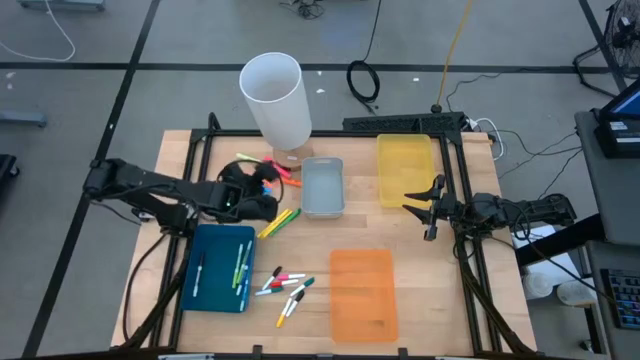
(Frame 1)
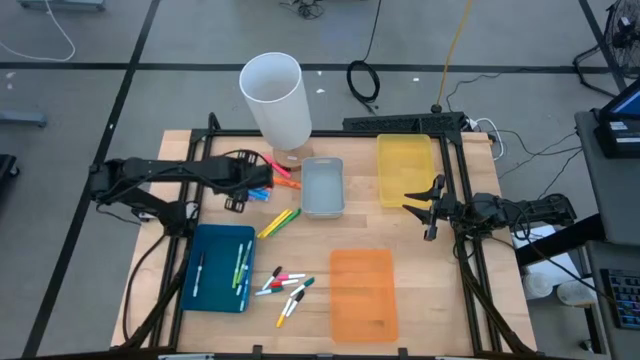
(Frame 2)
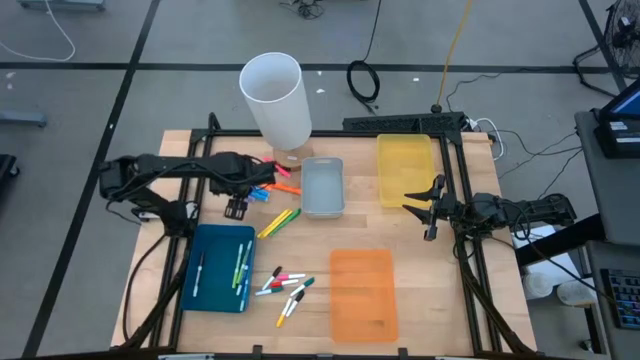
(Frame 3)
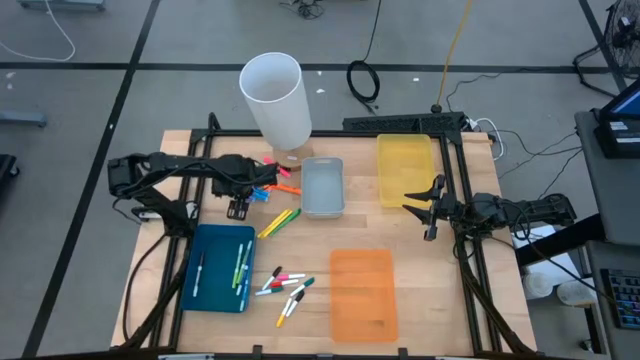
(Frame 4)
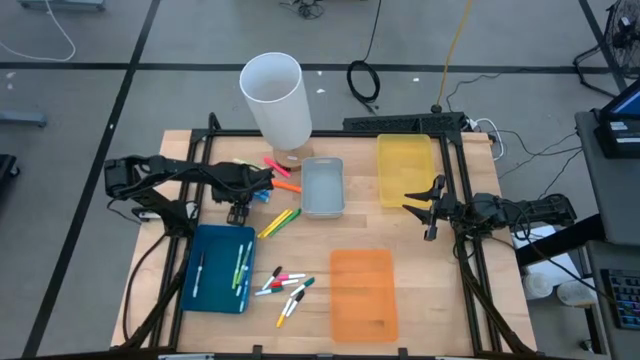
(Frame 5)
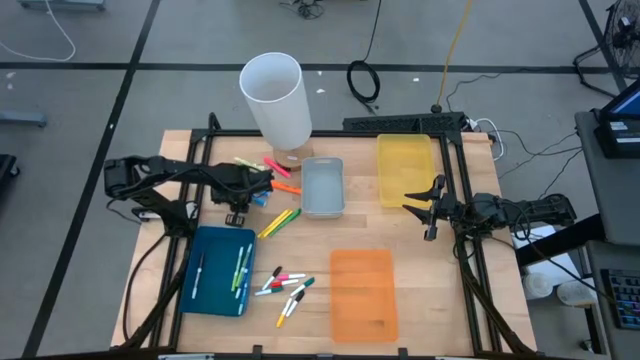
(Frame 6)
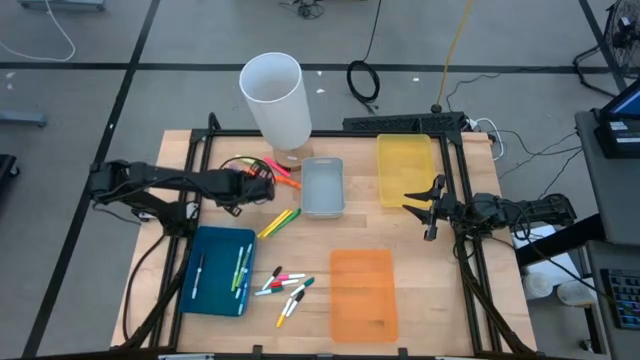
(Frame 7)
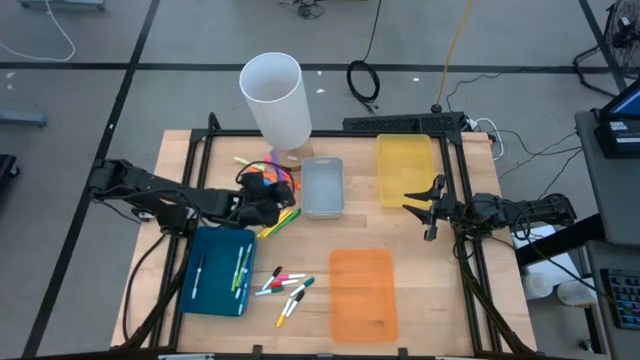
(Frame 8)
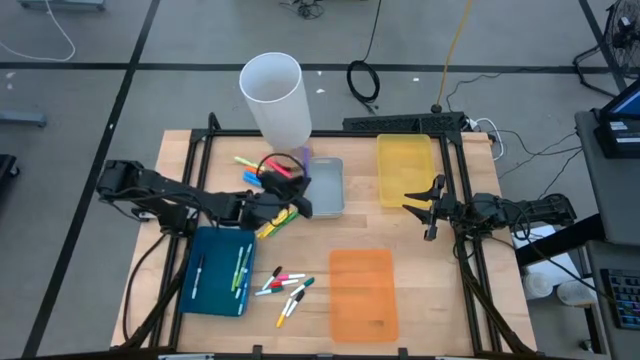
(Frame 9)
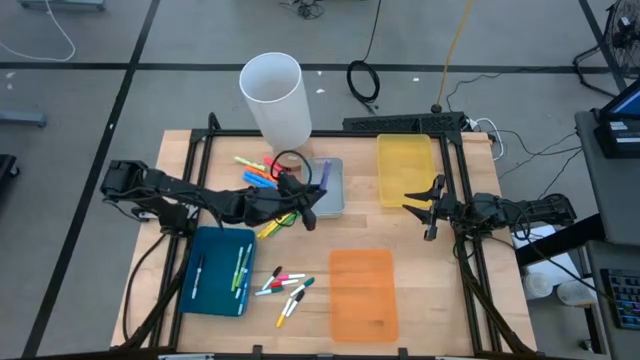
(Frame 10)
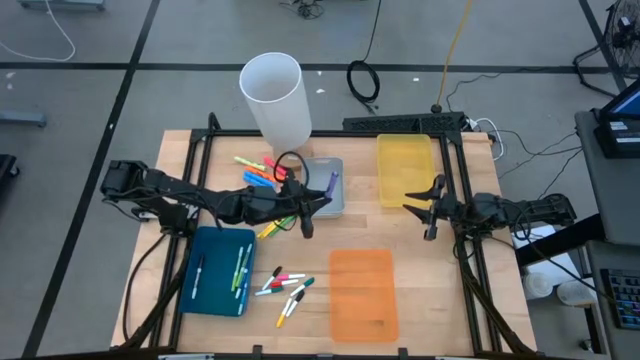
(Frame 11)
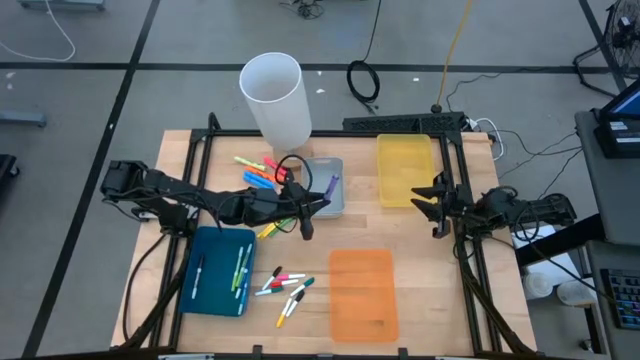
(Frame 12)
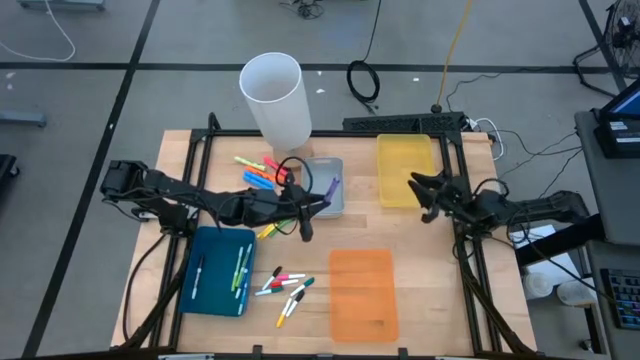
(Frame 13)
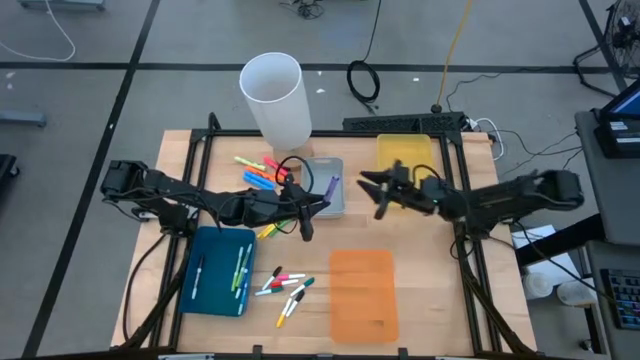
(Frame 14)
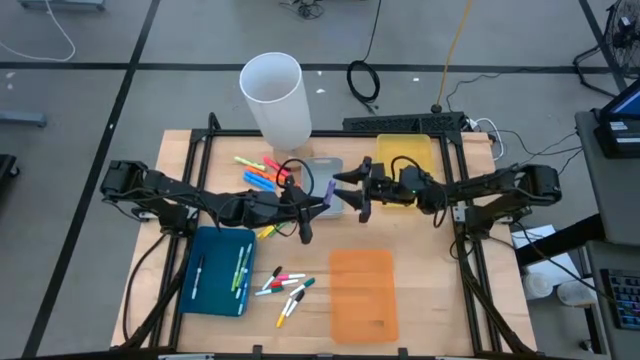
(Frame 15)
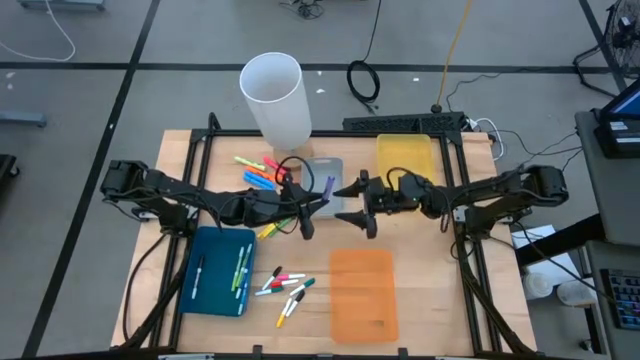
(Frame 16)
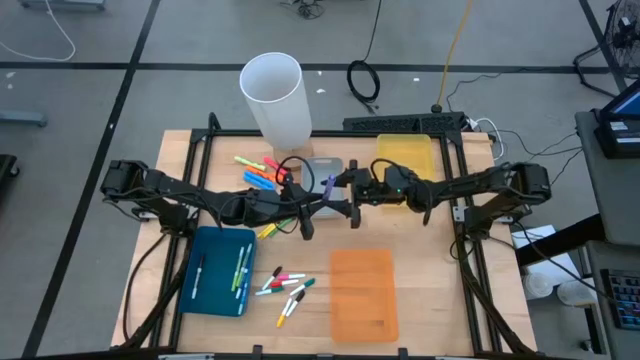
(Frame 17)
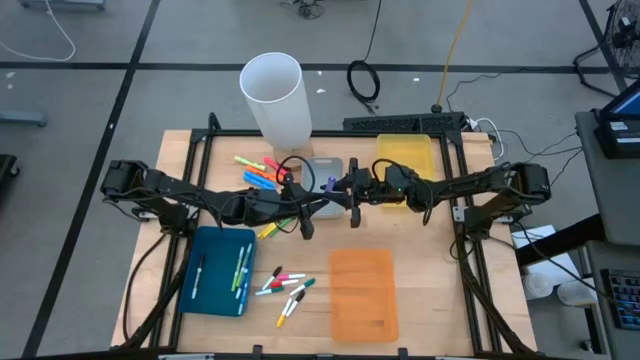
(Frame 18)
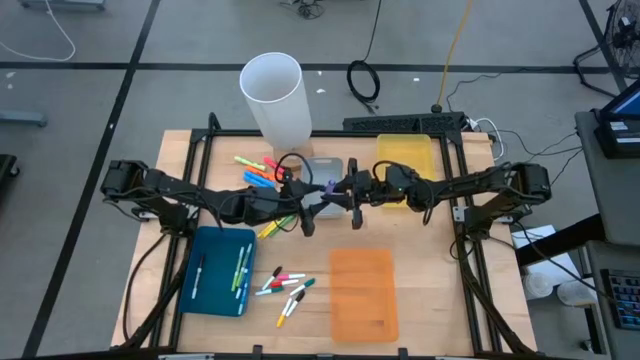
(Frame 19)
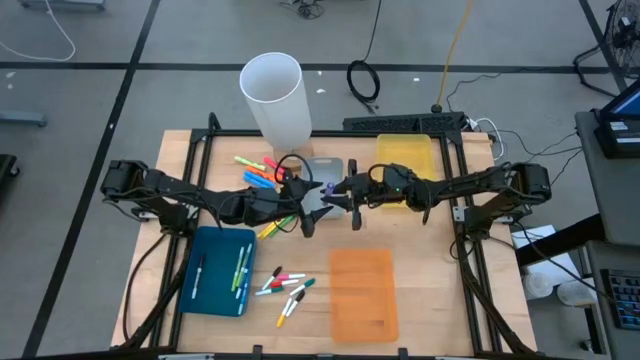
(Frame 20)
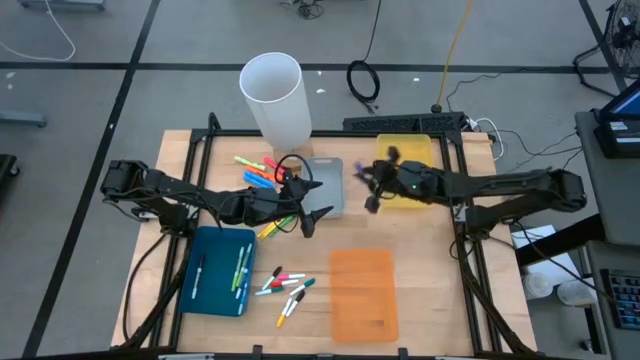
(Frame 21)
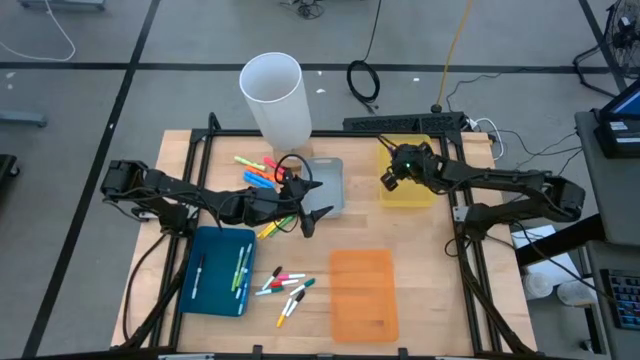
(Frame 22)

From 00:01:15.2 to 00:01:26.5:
Task: Pick & Place Markers
Put the large violet highlighter pen in the yellow bin

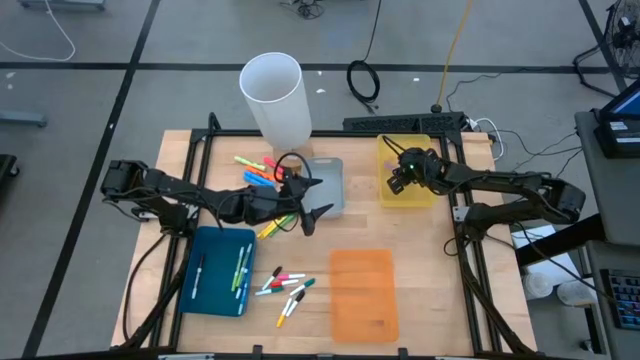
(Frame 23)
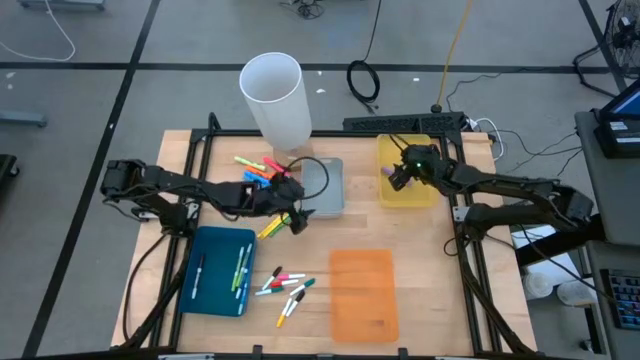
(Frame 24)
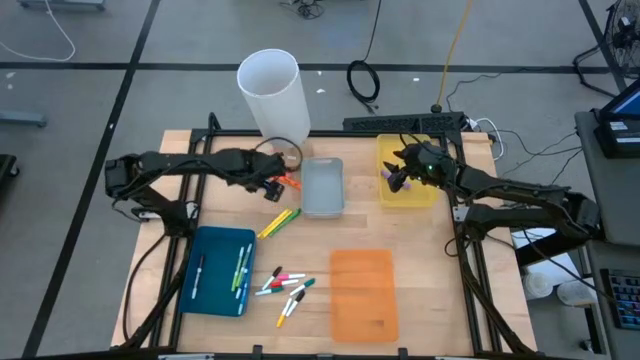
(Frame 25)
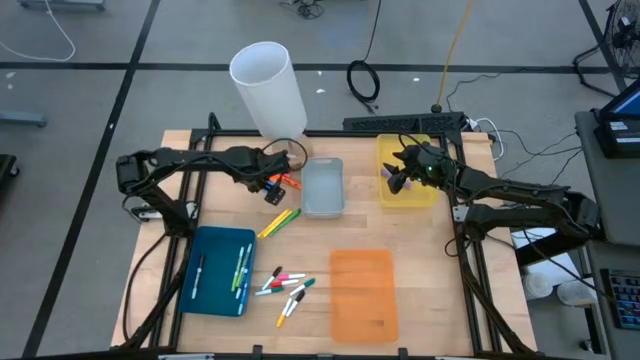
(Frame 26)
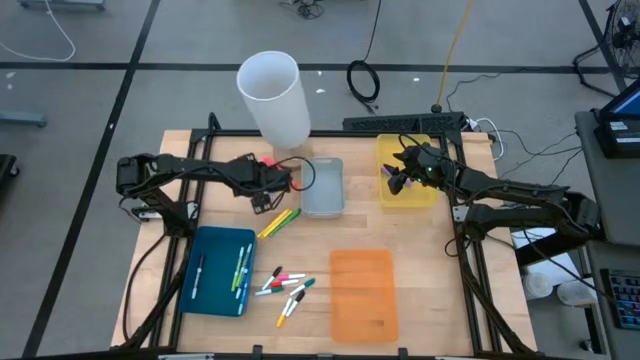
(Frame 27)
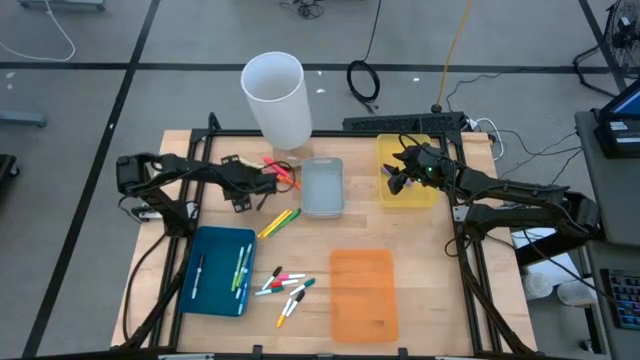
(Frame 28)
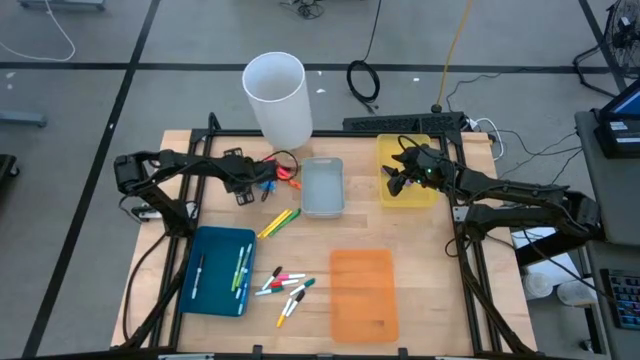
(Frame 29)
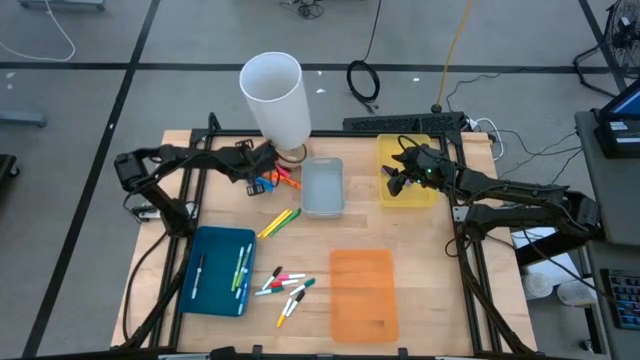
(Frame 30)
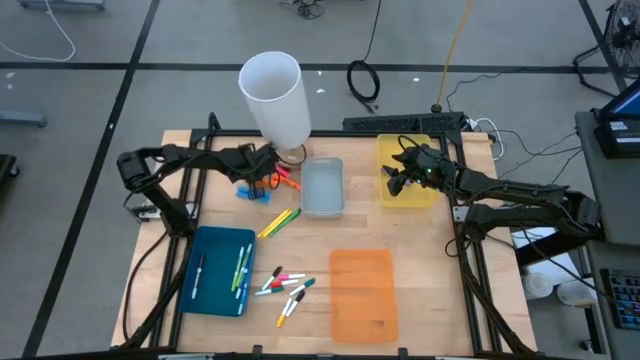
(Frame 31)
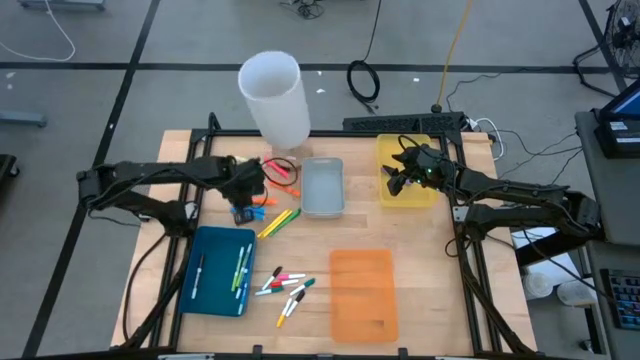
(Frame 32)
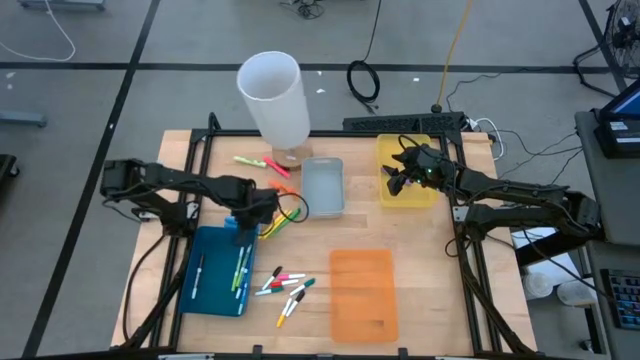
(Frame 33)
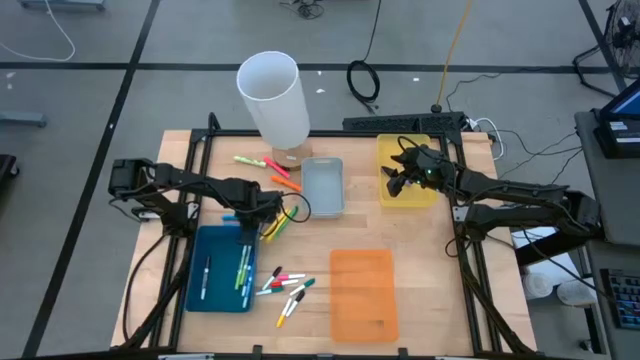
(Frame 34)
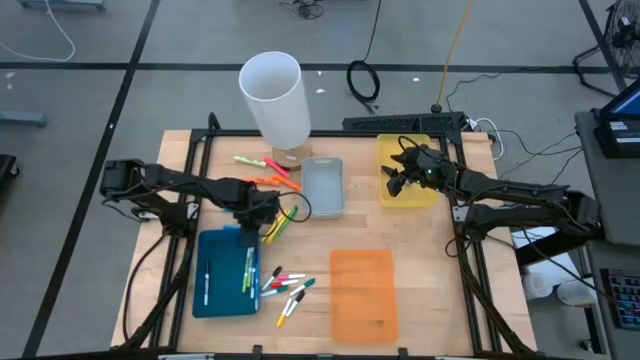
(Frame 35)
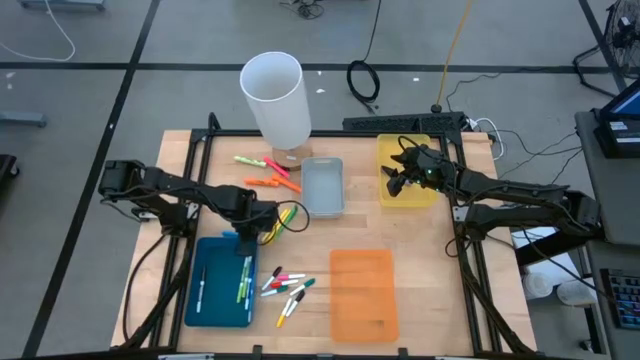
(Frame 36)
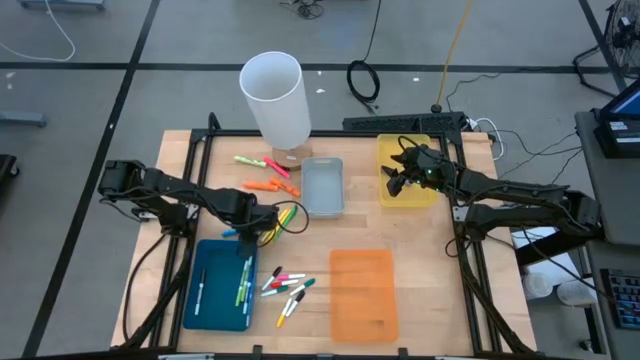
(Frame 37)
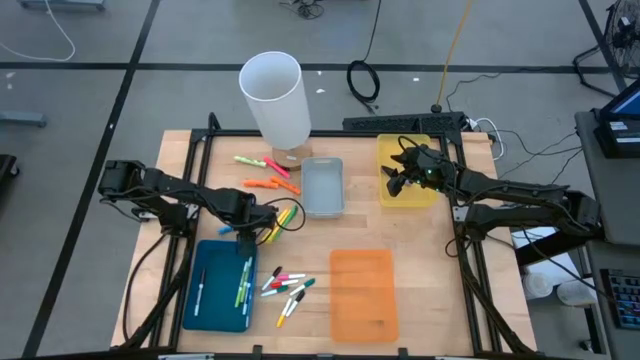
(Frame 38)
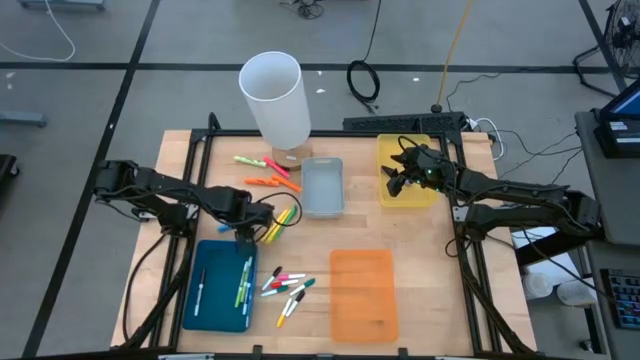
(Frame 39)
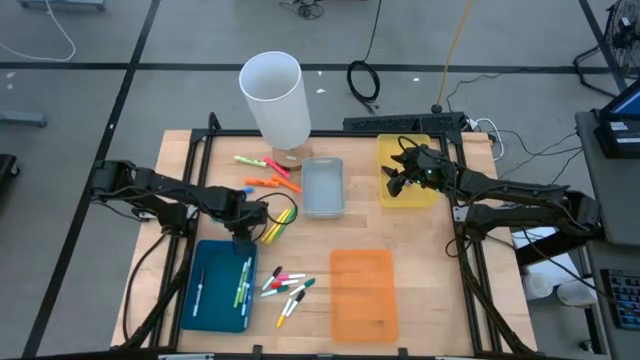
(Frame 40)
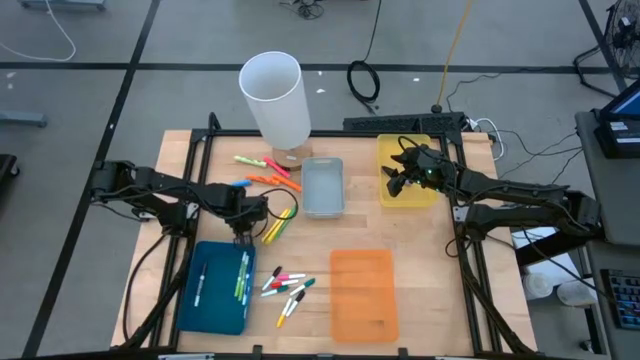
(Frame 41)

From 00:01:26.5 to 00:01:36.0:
Put the bottom large blue highlighter pen in the yellow bin

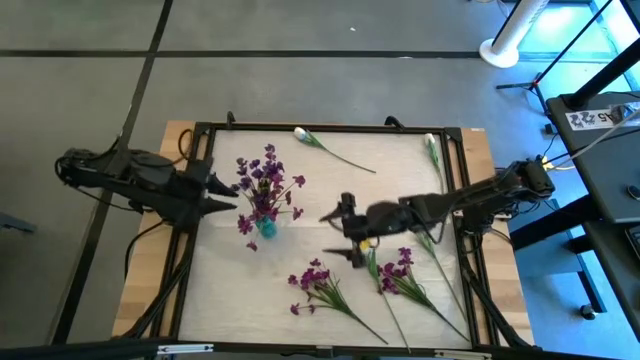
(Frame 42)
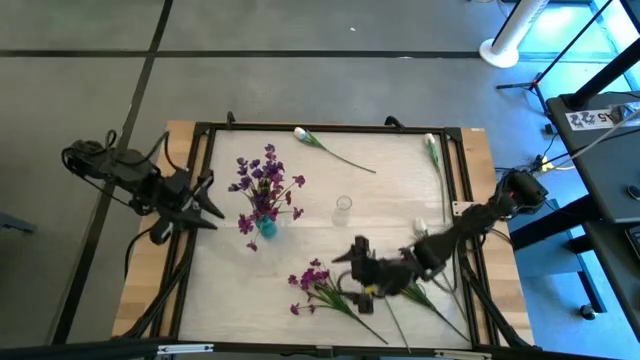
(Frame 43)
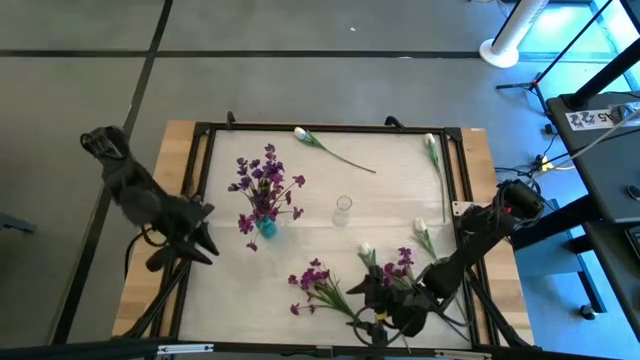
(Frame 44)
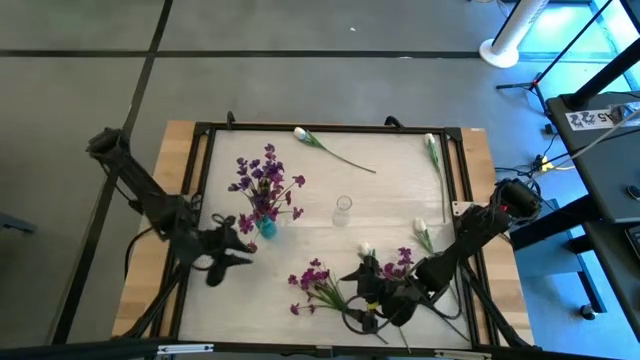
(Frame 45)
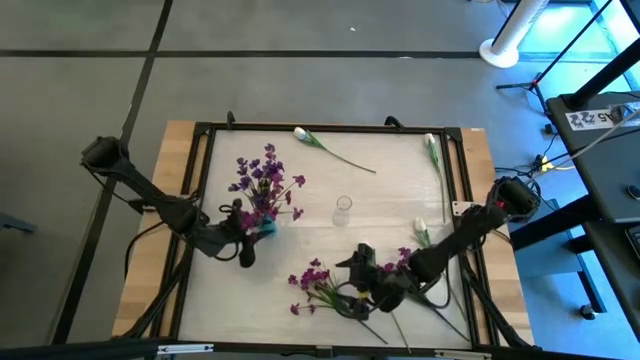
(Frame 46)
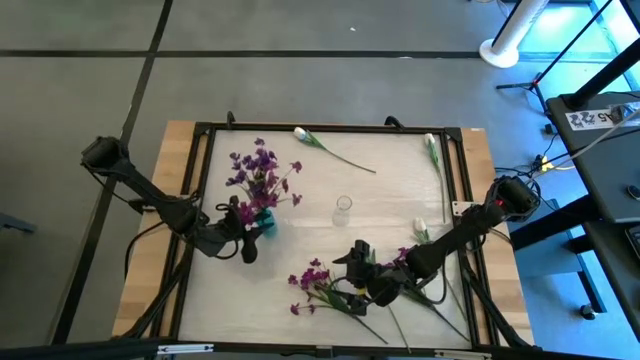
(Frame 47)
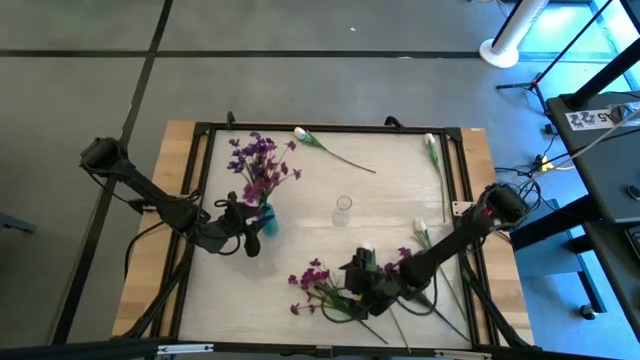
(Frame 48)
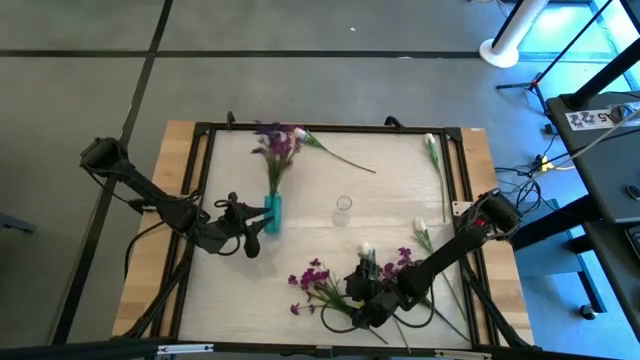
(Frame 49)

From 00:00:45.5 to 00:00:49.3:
Task: Sort flowers into vase by color
Adjust the blue flower vase
